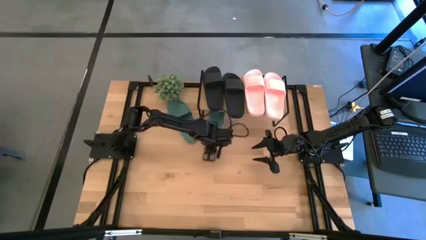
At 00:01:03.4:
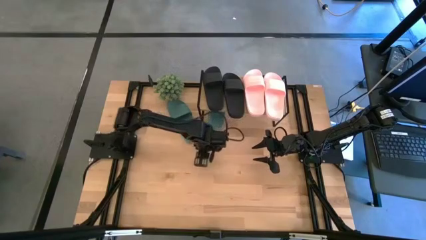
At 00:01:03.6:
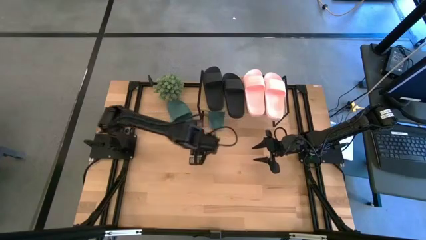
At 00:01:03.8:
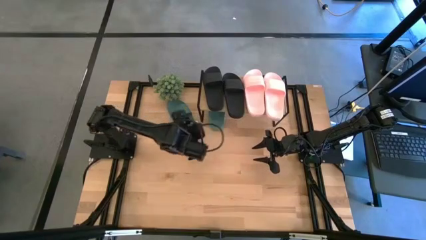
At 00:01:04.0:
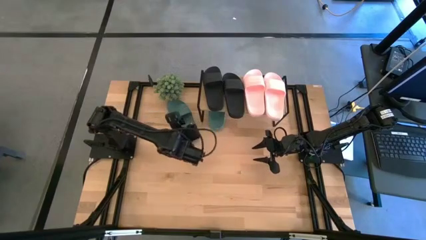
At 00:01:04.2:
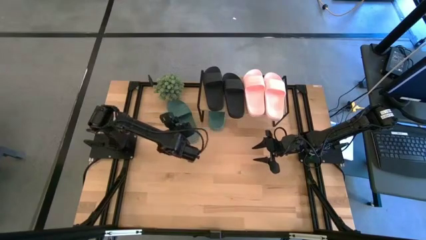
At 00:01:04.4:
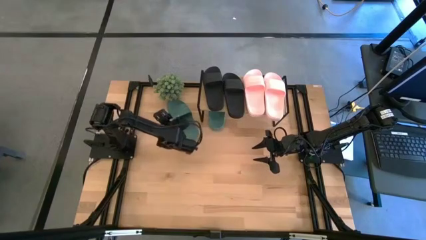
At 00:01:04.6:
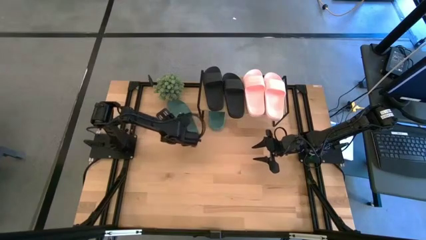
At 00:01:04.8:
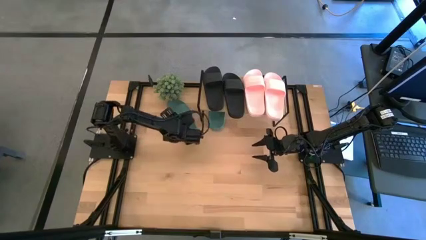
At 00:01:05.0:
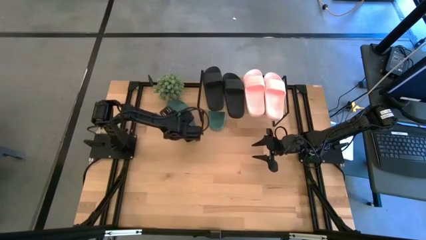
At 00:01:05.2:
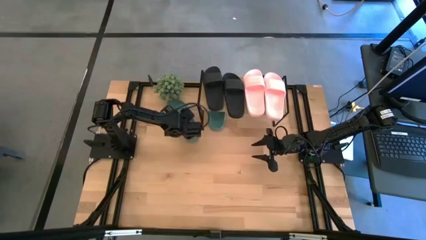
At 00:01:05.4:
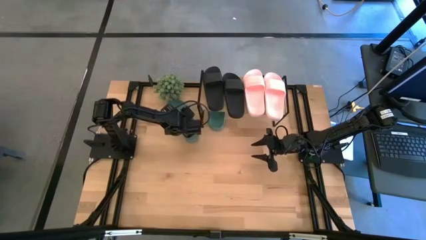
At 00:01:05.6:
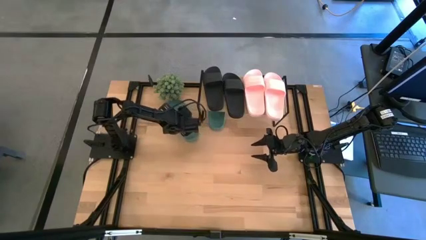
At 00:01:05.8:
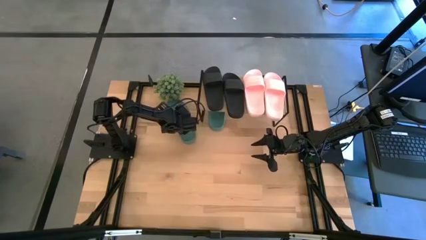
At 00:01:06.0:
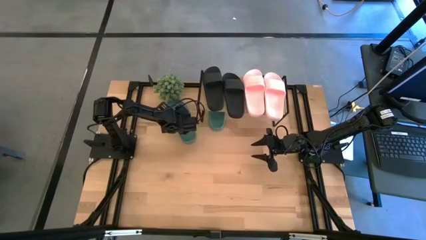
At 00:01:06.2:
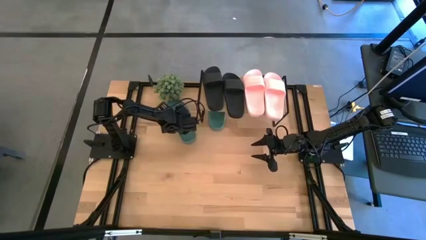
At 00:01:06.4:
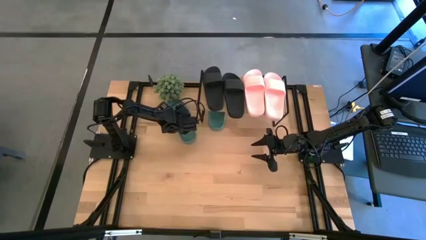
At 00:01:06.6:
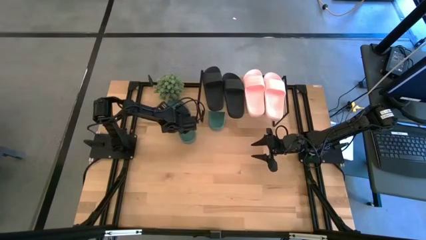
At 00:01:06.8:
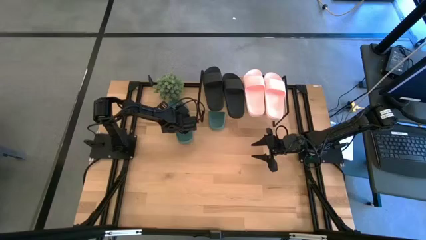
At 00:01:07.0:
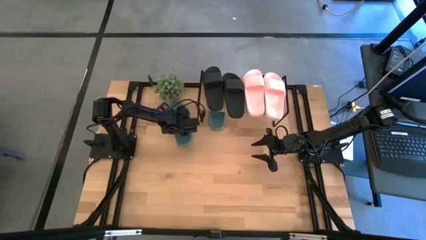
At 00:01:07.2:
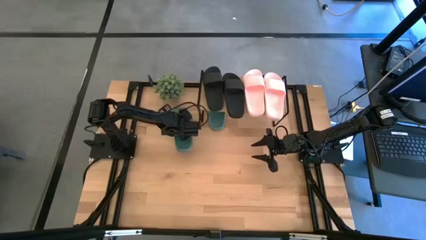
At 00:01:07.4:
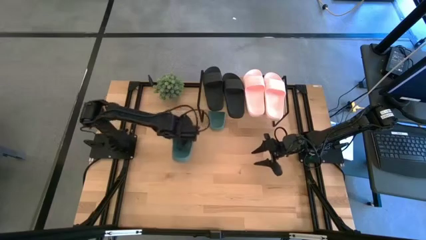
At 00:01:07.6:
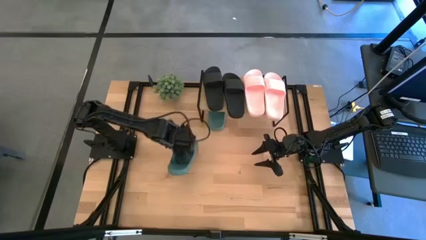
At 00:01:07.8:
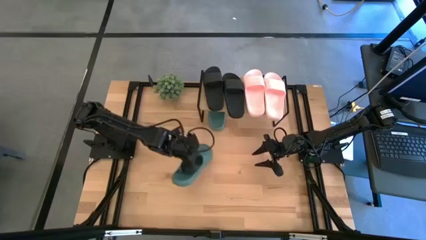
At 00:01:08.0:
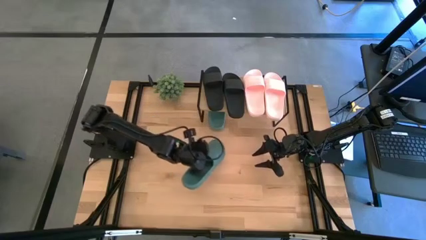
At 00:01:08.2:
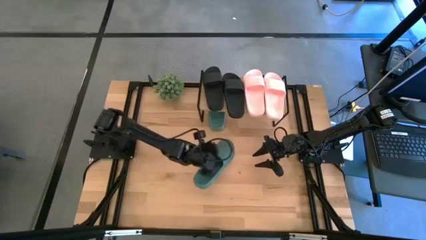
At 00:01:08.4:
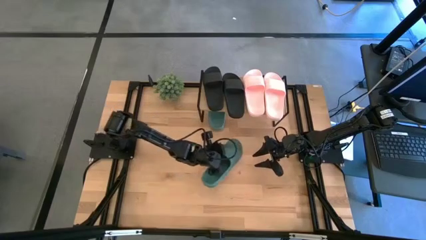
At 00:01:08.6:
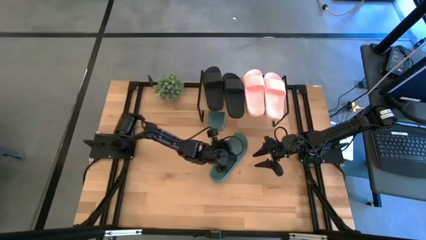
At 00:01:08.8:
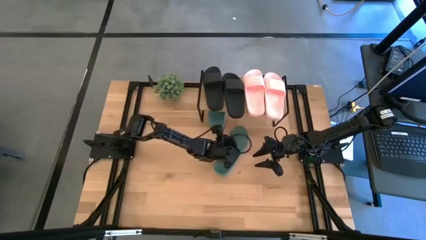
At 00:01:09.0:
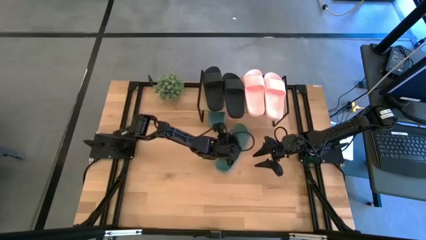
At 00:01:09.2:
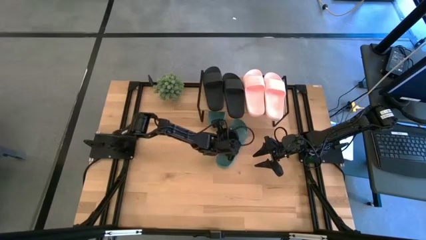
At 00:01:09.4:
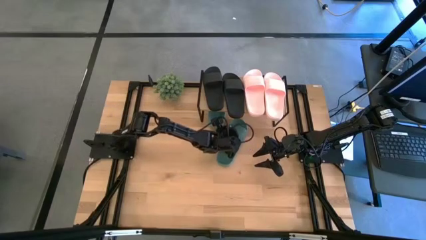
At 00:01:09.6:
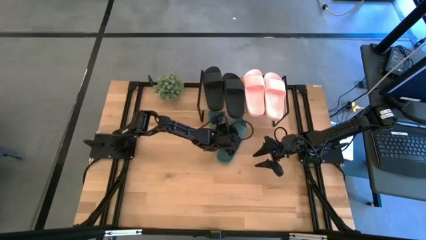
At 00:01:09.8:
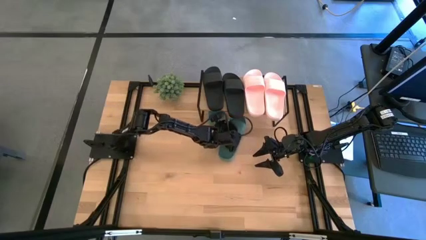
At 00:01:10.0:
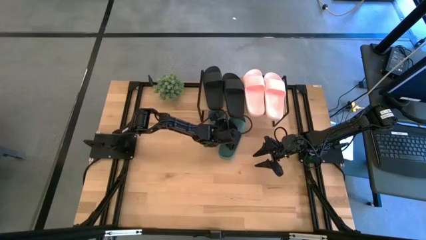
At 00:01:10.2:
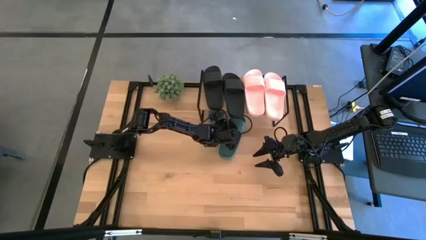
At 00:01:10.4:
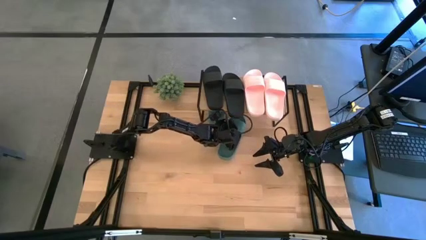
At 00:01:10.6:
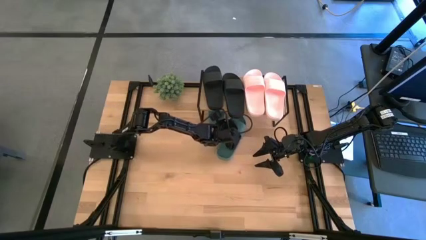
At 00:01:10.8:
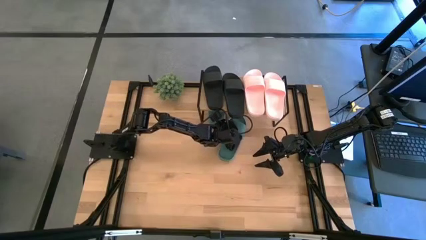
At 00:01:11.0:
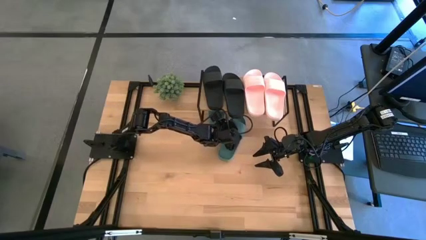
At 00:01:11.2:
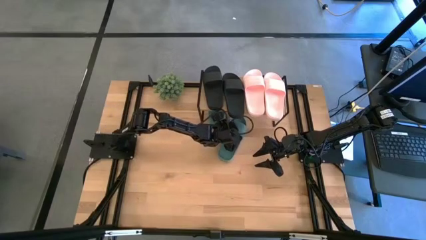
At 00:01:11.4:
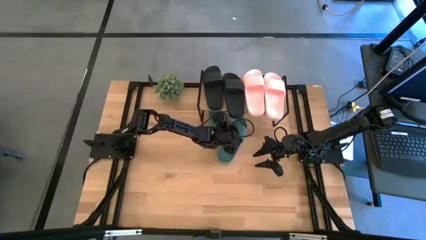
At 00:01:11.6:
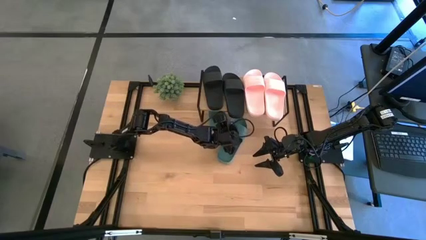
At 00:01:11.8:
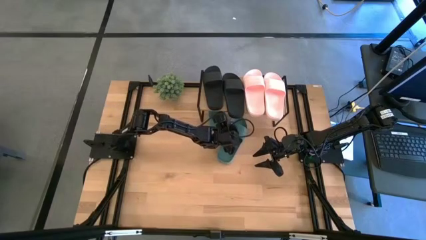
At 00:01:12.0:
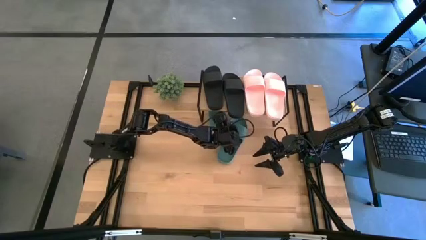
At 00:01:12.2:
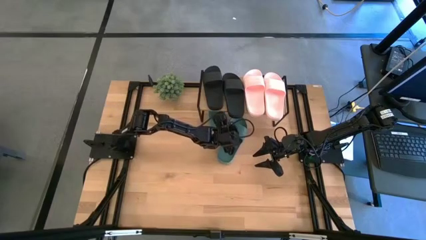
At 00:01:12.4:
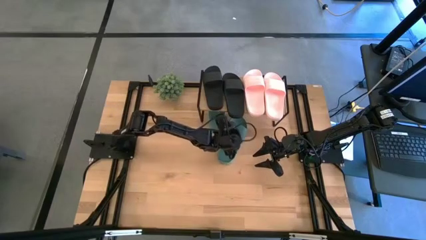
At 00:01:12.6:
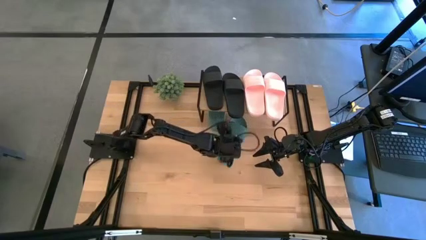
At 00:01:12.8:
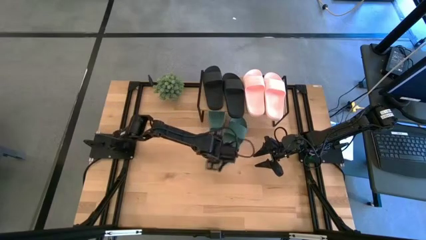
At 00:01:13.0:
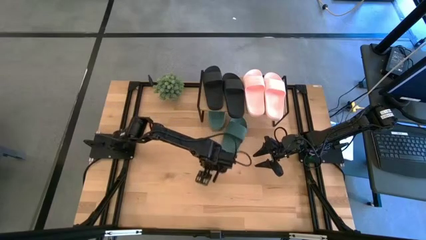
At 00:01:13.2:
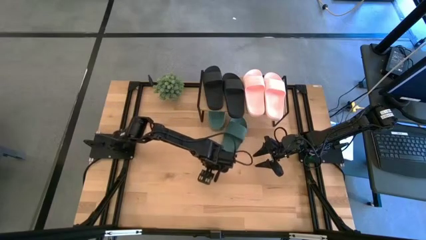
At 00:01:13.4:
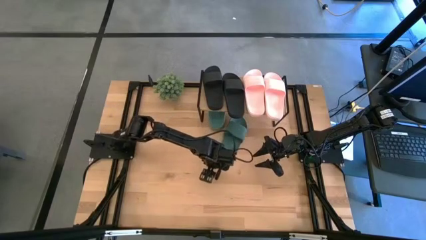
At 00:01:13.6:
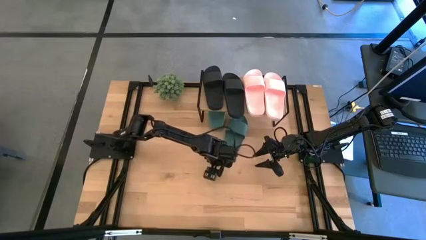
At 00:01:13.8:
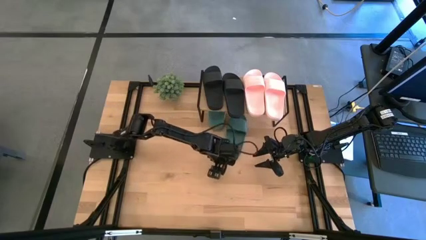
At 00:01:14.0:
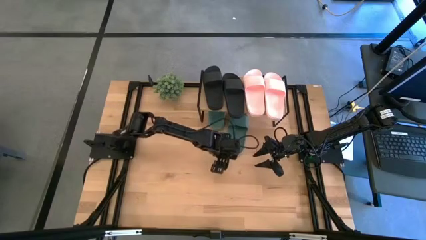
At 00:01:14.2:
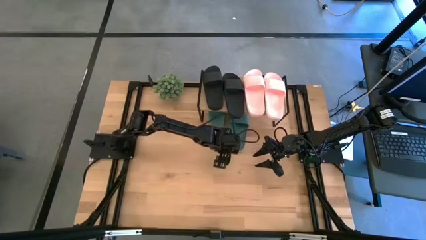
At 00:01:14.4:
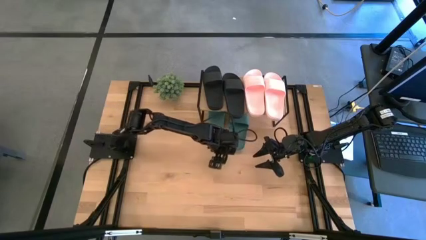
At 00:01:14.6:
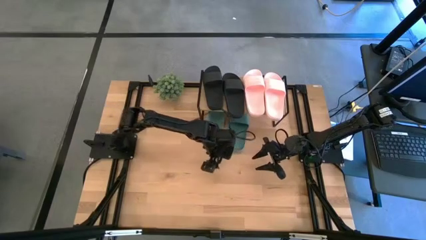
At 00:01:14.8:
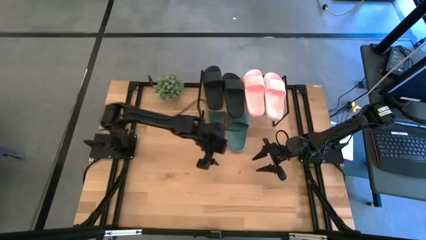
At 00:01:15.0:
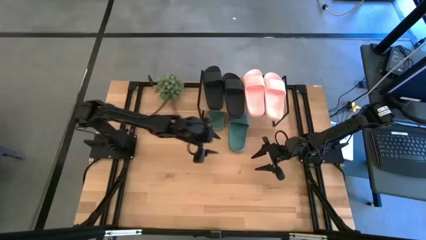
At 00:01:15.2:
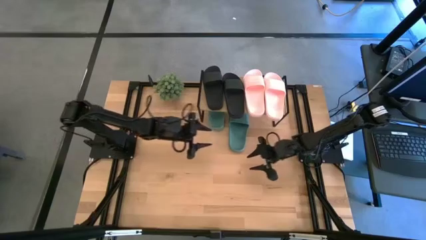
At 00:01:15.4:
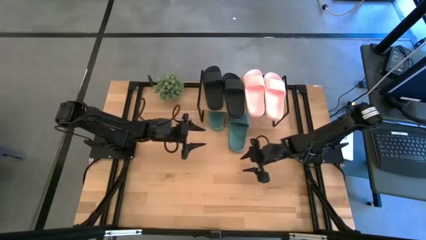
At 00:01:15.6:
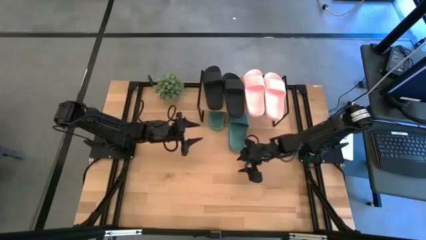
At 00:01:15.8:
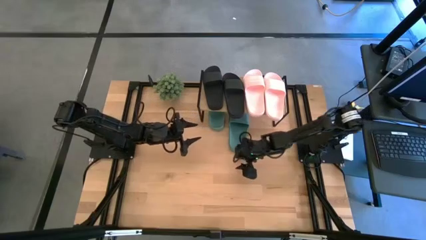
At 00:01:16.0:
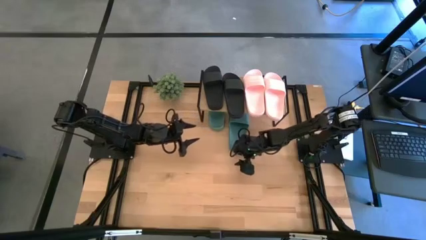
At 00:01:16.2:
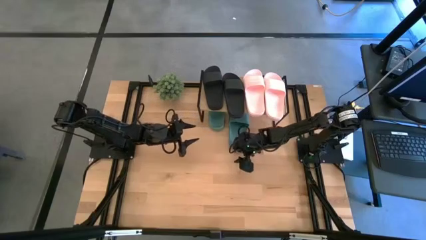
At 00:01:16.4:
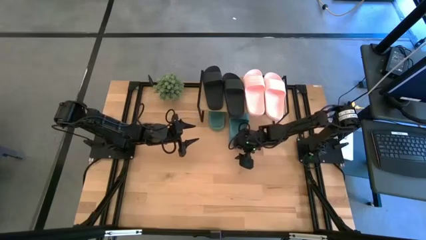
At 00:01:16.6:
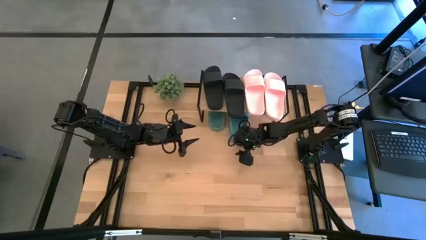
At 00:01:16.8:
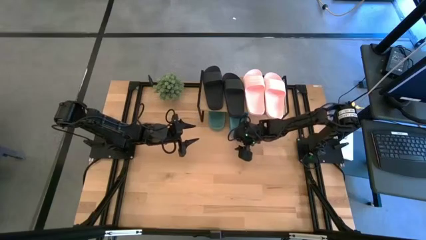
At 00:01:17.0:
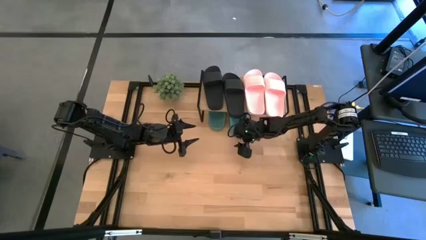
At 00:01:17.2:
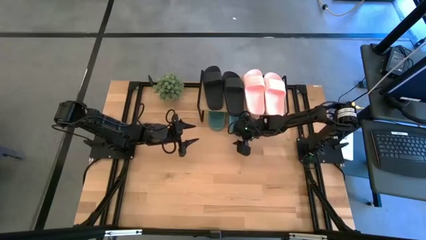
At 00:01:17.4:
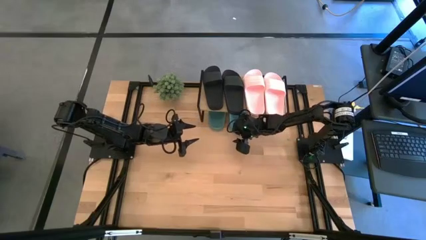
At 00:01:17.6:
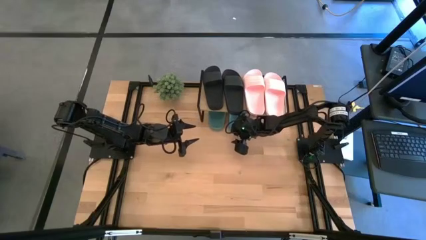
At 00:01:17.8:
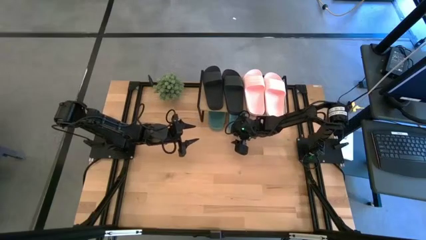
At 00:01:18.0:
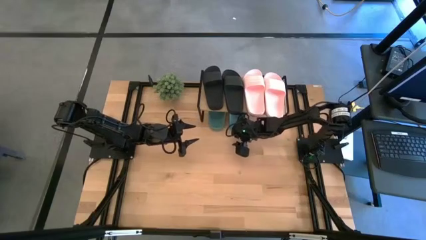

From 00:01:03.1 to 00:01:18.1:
Task: Pick and place slides into the shelf
Put the green slide under the shelf
